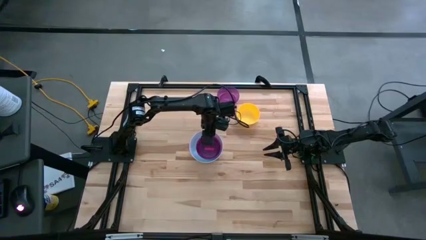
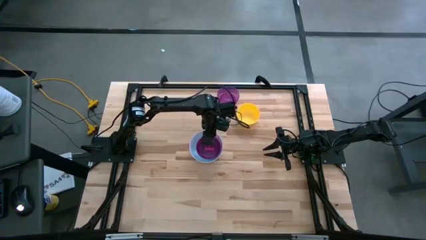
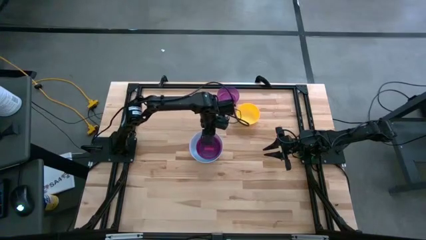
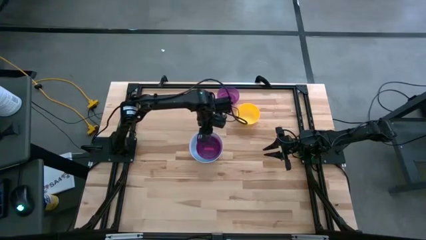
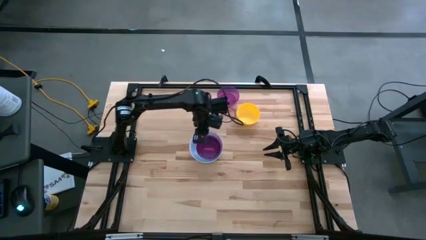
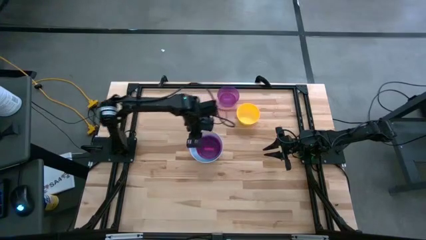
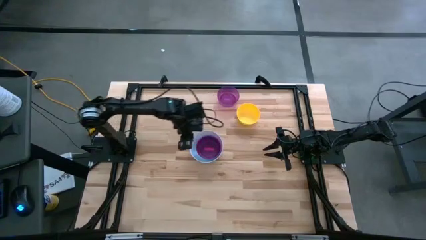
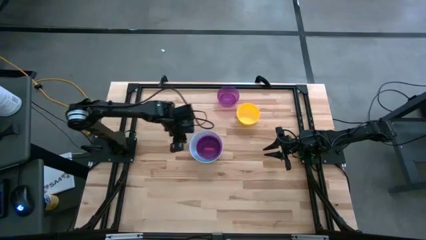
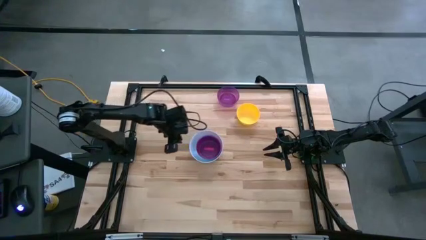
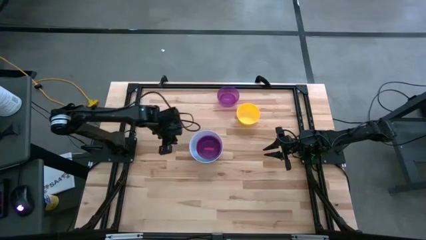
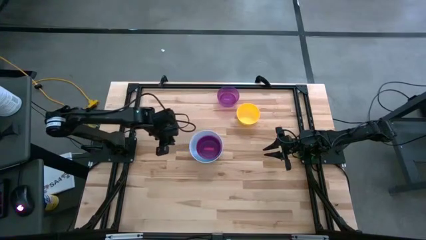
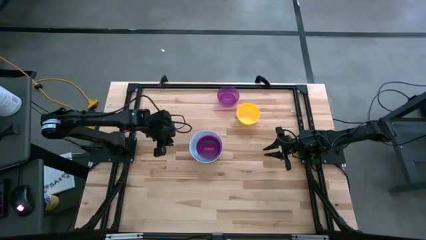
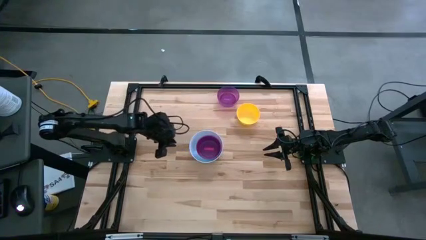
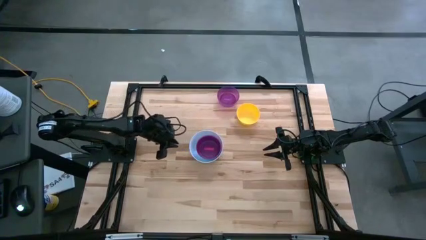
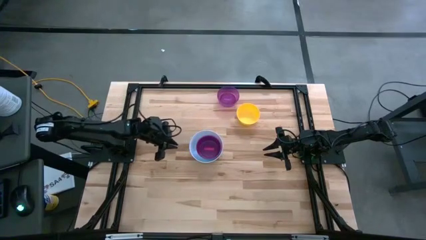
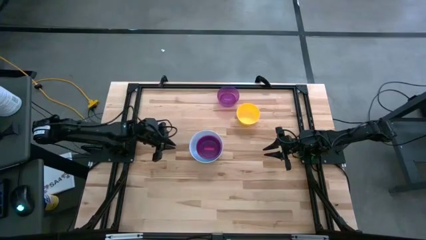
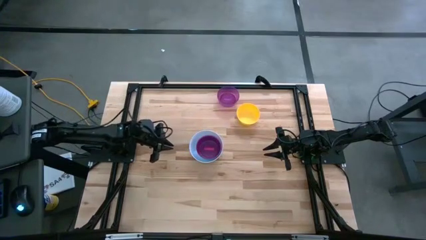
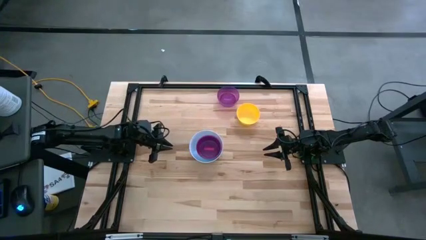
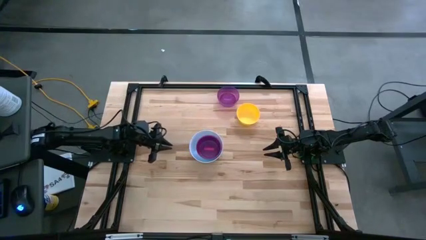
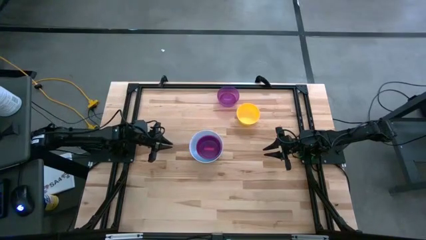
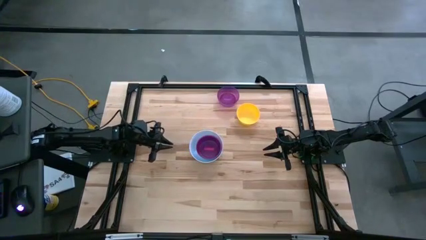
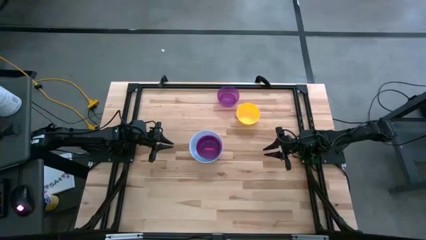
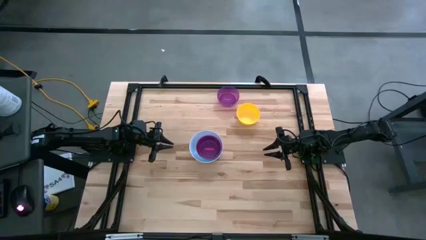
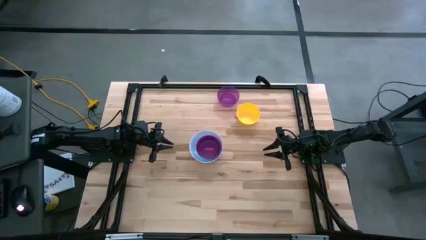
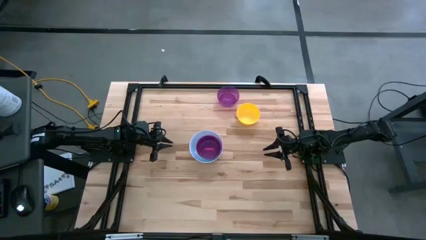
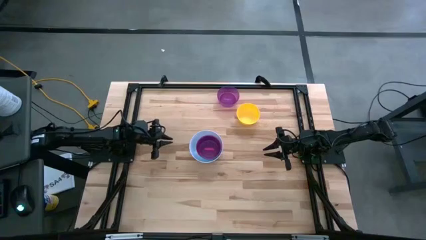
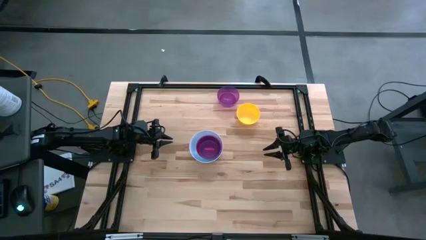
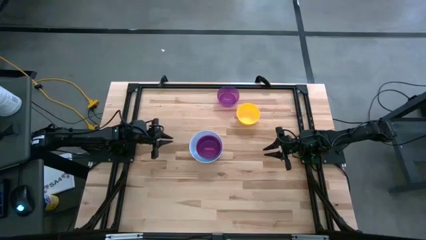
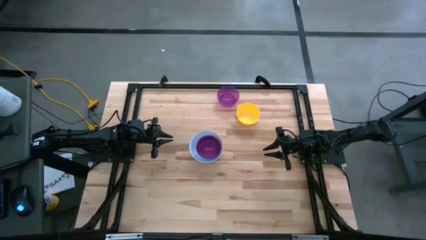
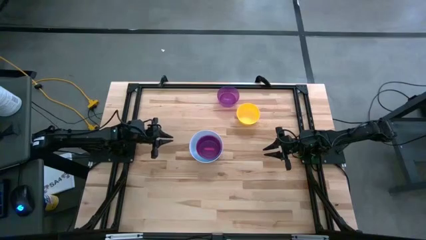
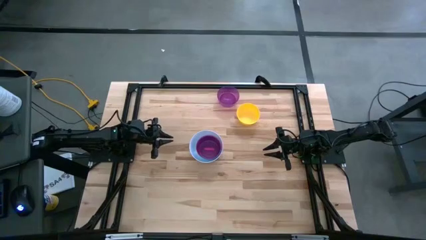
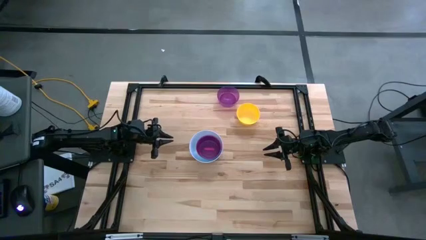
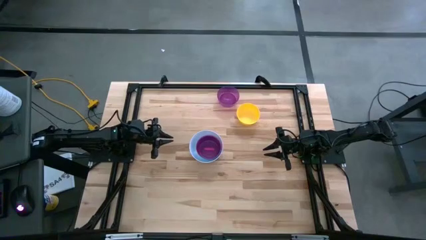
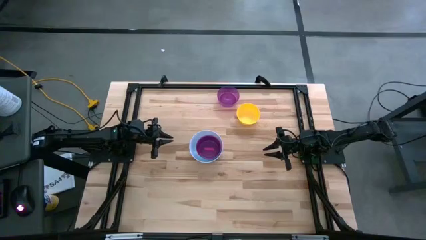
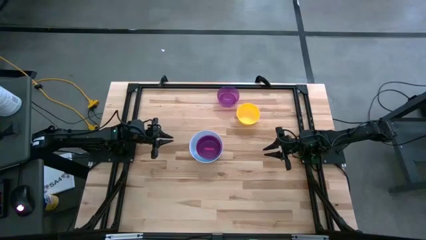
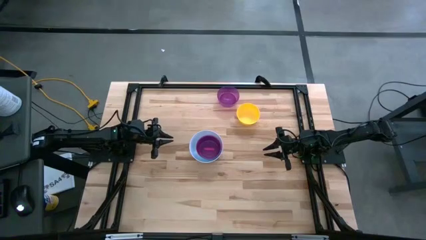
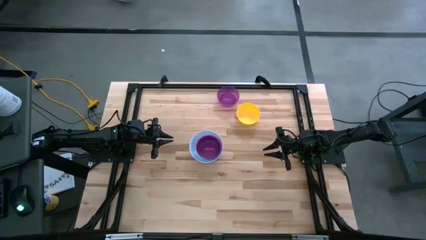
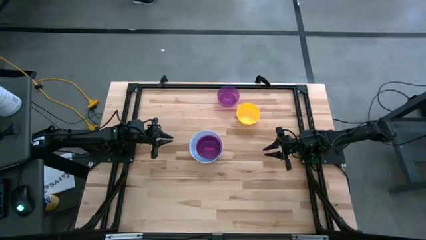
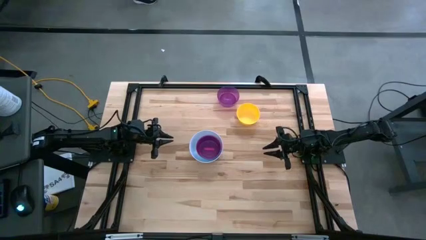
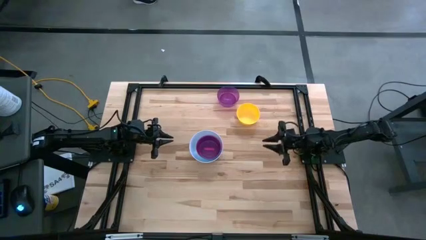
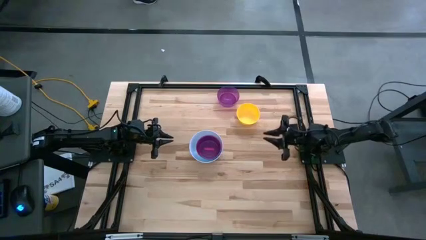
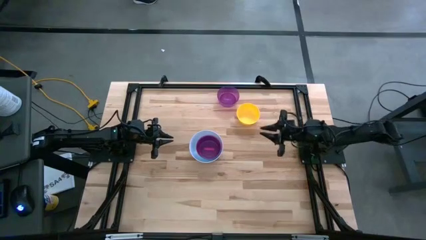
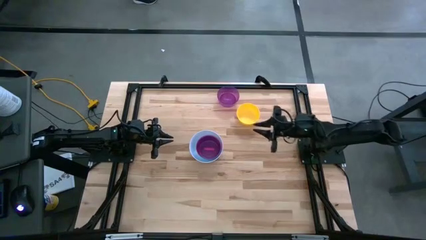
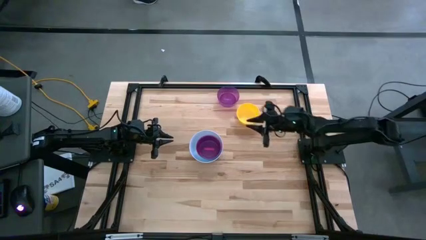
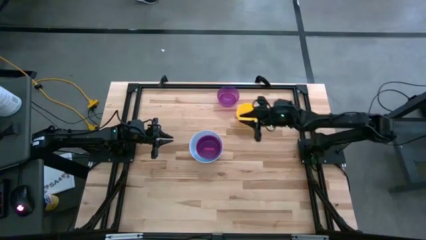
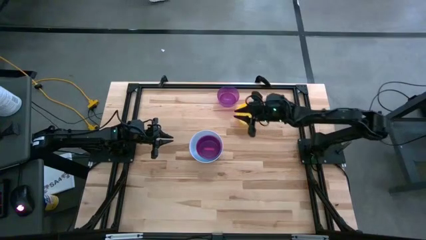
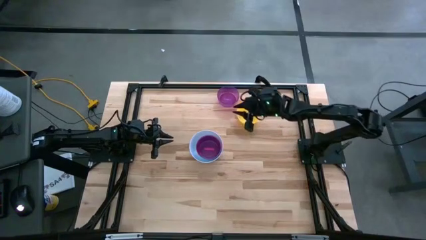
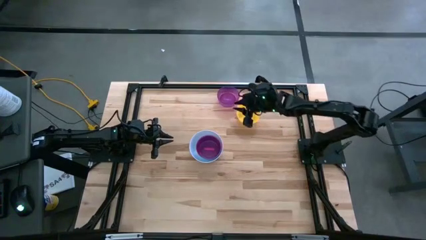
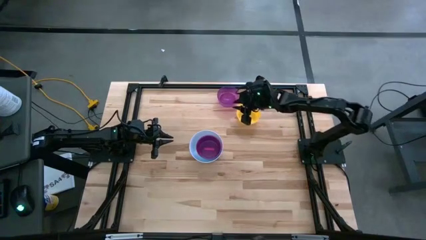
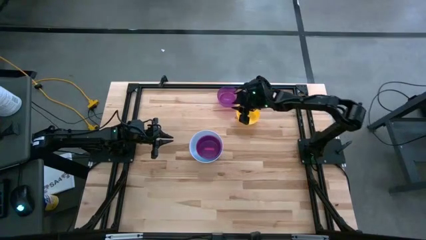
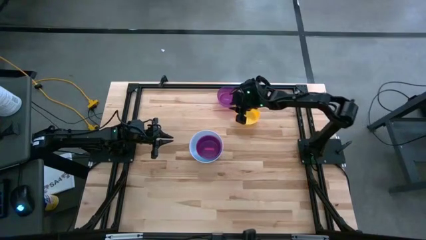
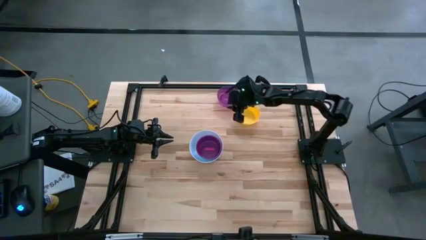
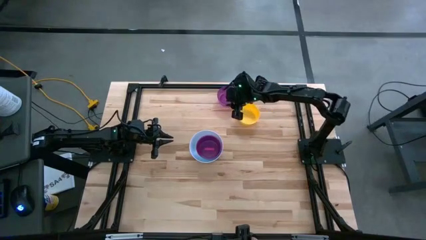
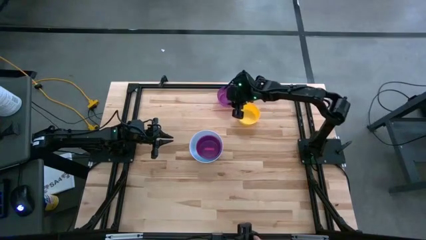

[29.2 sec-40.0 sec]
Stack the purple bowl on the pink bowl

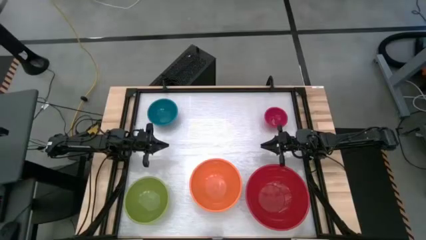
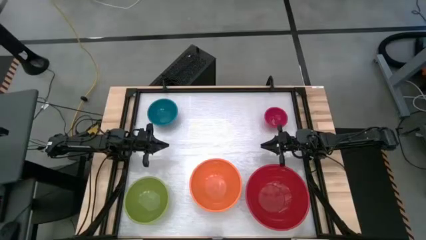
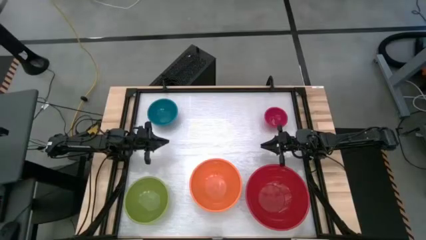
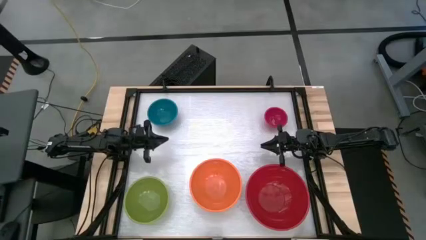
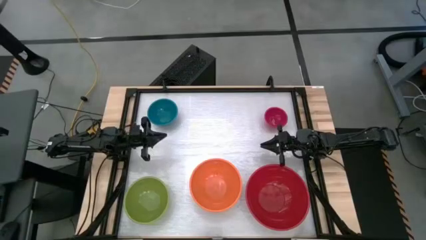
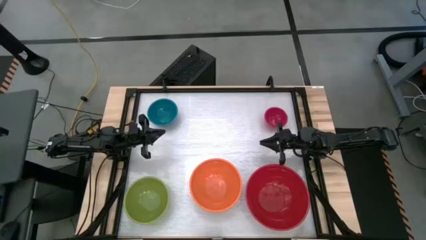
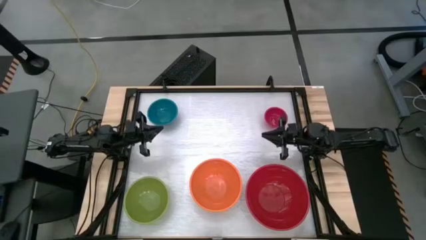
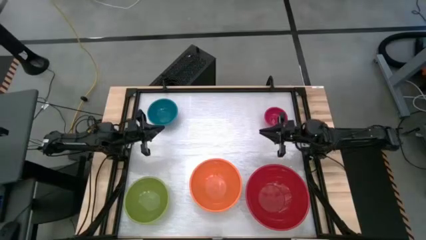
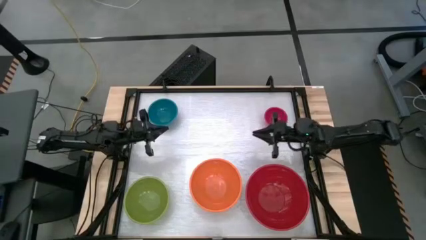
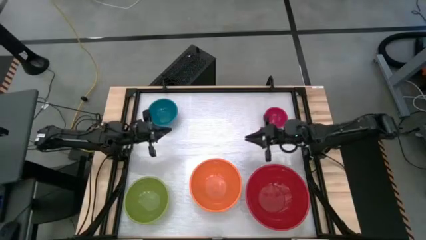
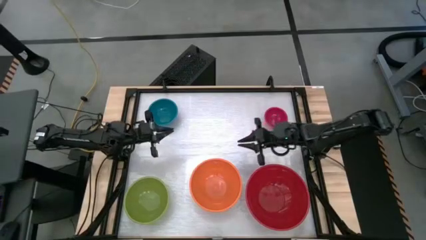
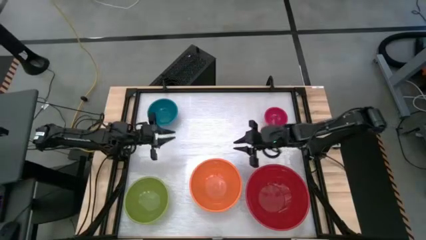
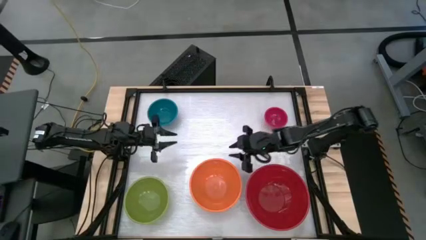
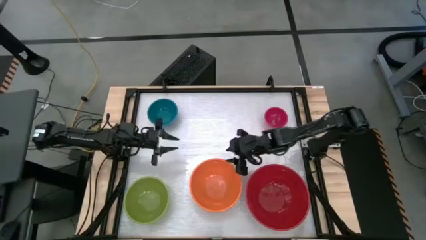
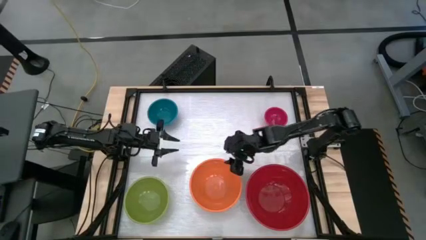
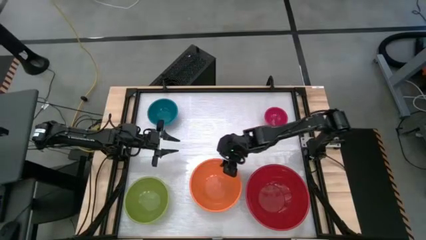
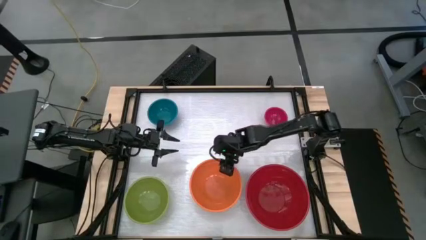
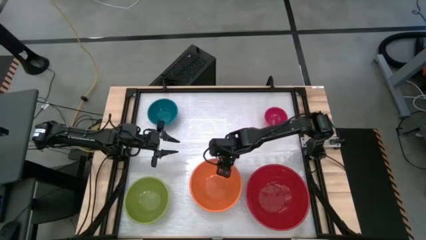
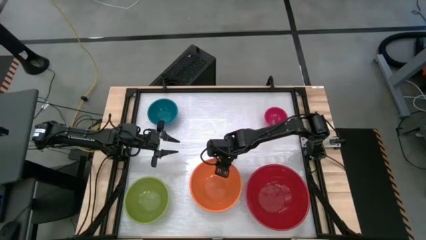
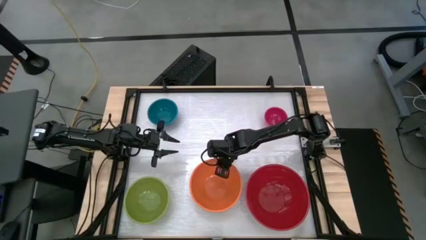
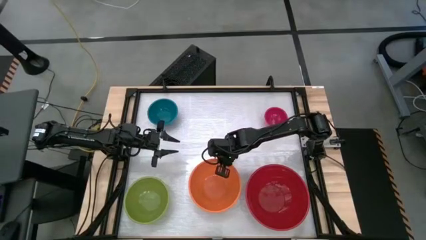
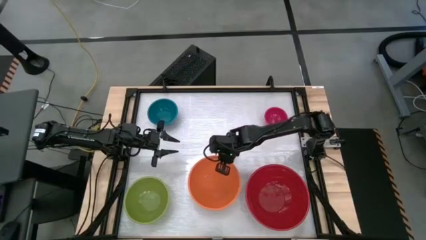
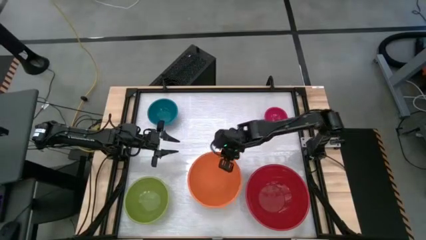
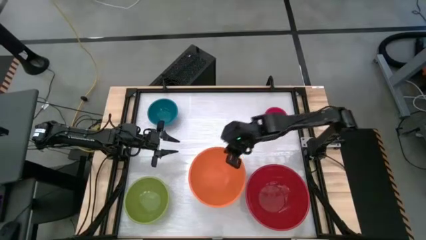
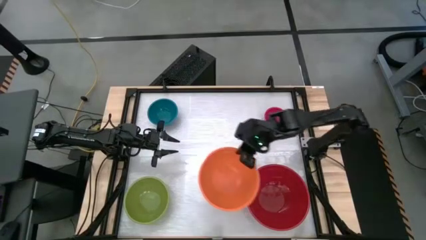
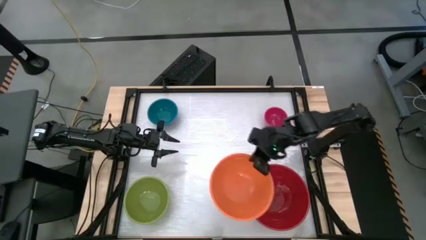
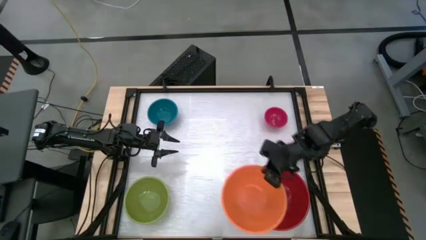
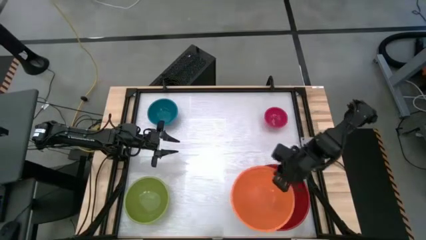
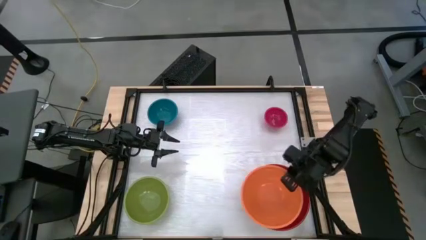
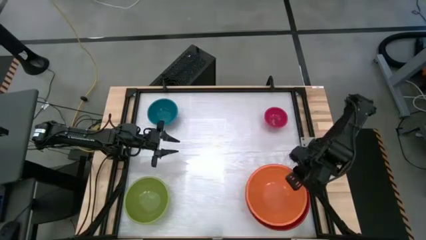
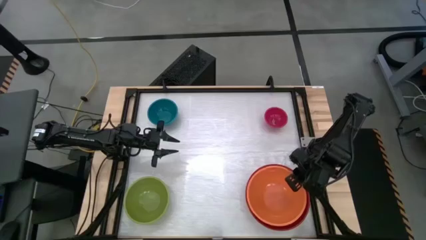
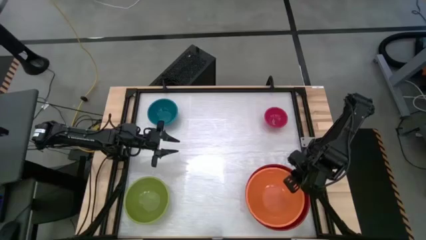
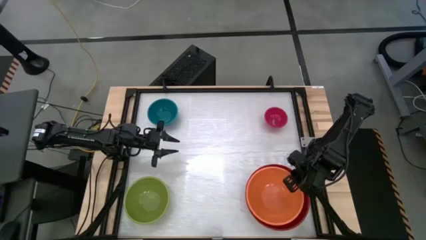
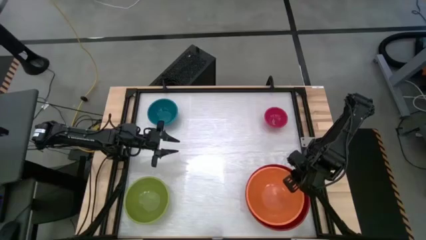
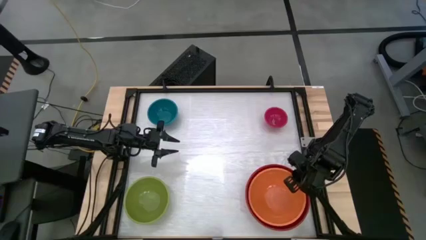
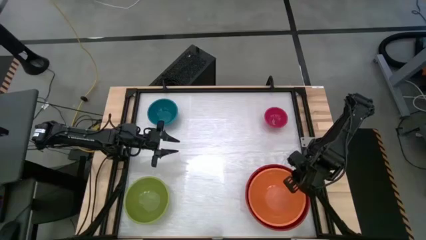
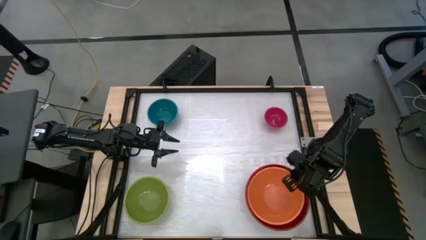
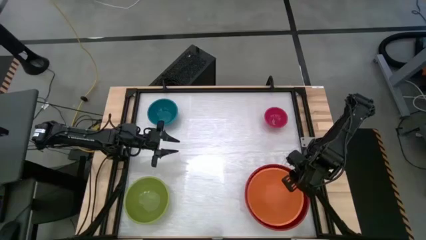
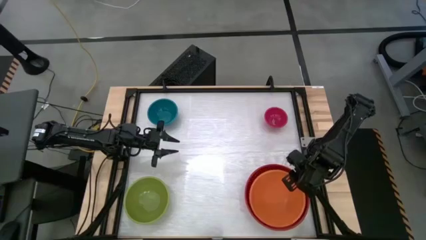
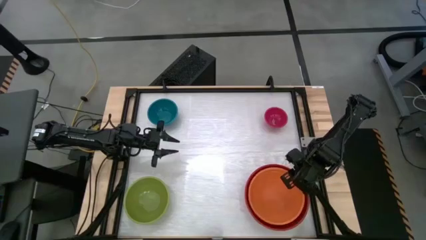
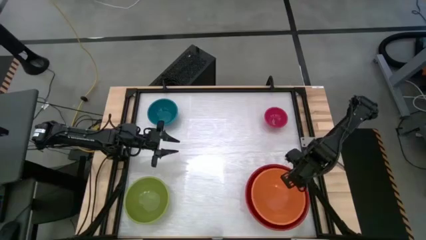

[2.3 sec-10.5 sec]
Stack the orange bowl on top of the red bowl
